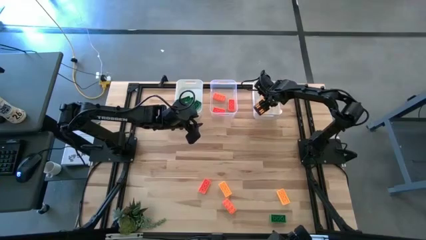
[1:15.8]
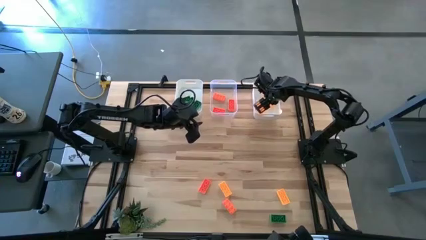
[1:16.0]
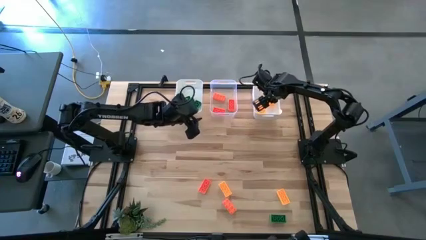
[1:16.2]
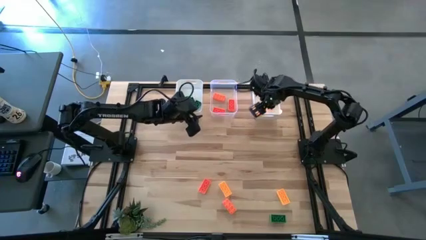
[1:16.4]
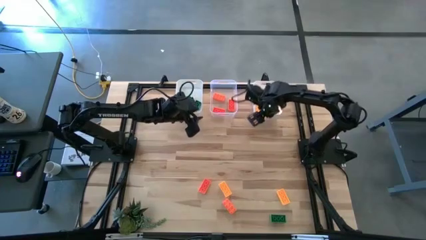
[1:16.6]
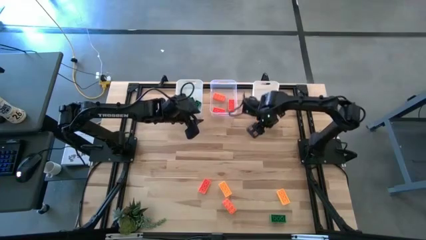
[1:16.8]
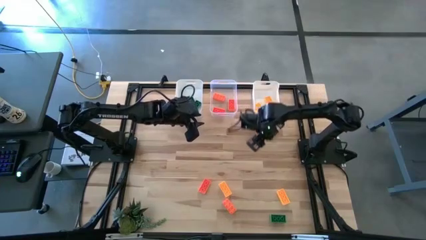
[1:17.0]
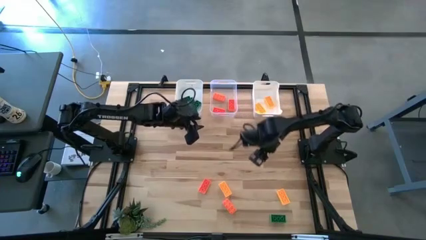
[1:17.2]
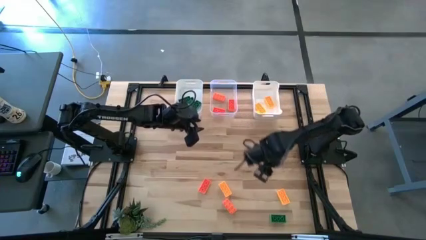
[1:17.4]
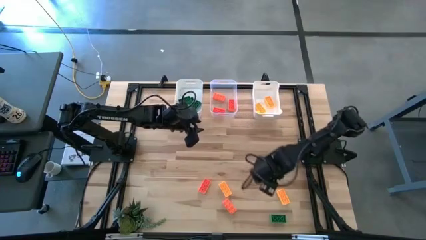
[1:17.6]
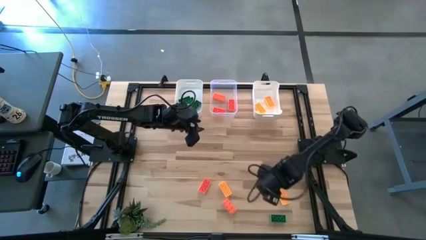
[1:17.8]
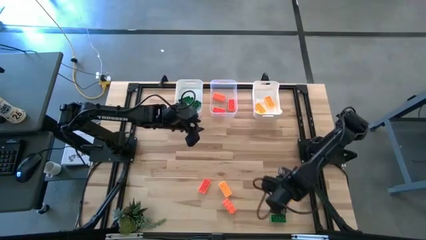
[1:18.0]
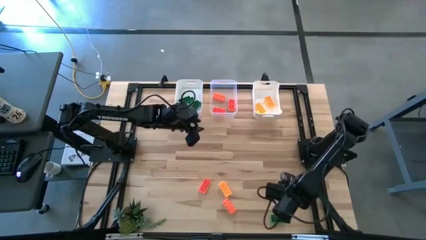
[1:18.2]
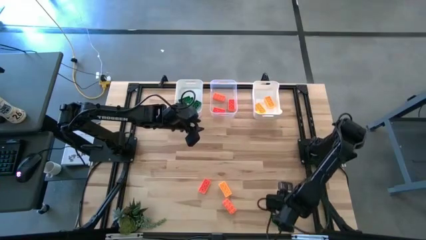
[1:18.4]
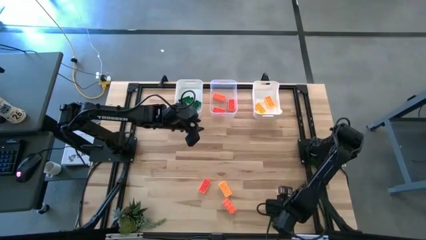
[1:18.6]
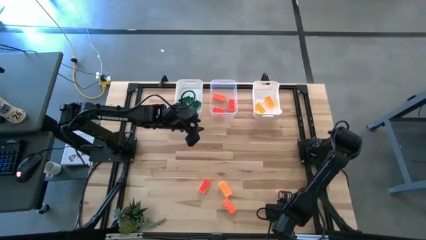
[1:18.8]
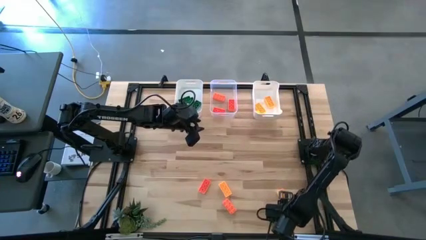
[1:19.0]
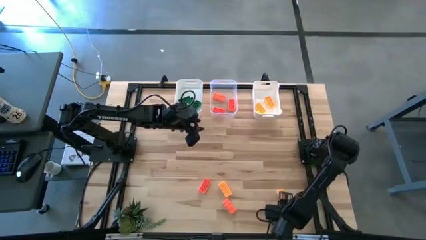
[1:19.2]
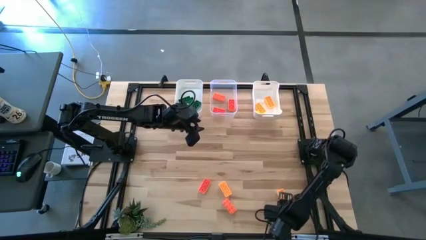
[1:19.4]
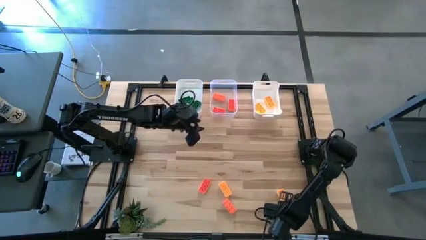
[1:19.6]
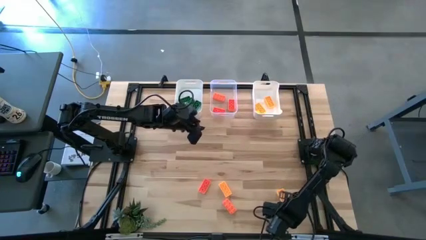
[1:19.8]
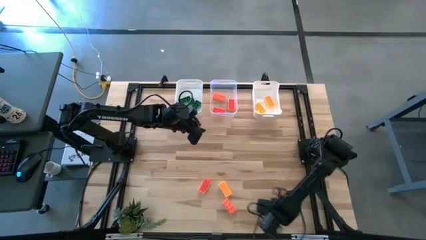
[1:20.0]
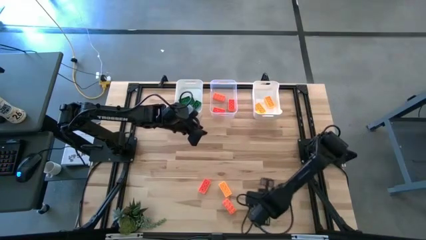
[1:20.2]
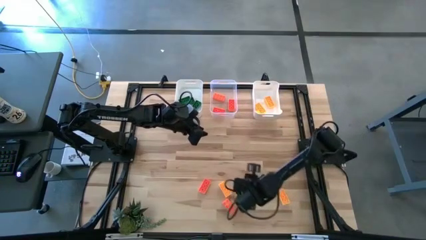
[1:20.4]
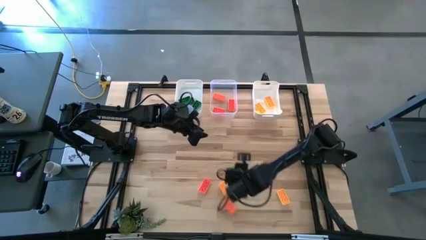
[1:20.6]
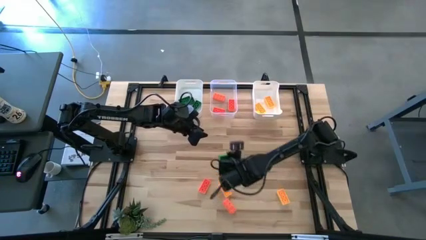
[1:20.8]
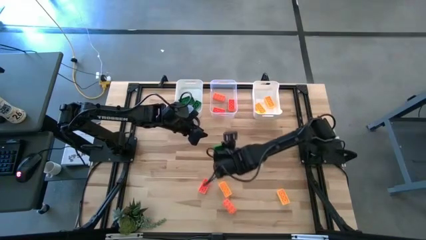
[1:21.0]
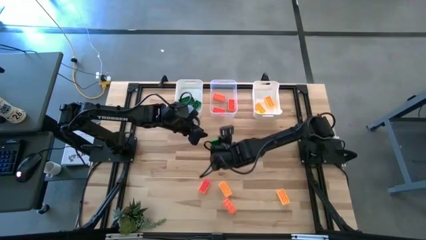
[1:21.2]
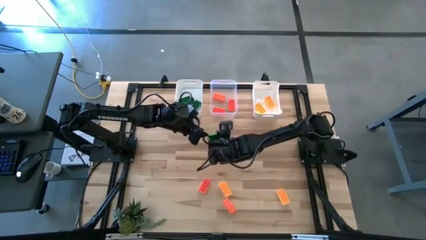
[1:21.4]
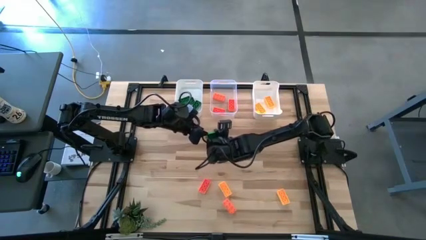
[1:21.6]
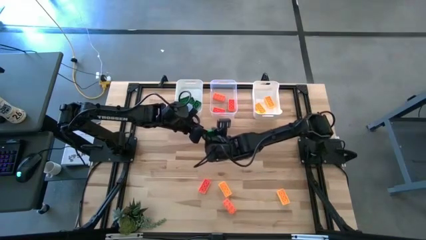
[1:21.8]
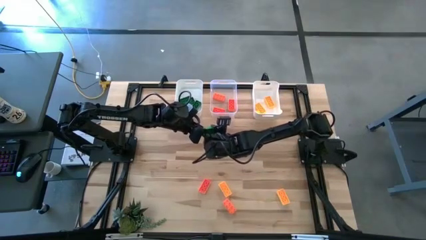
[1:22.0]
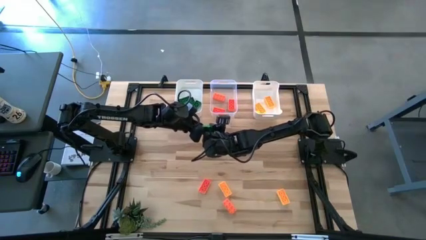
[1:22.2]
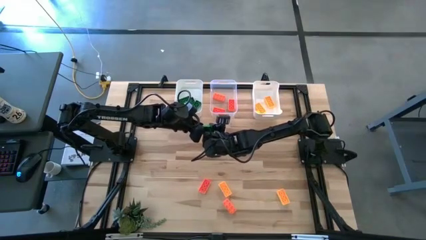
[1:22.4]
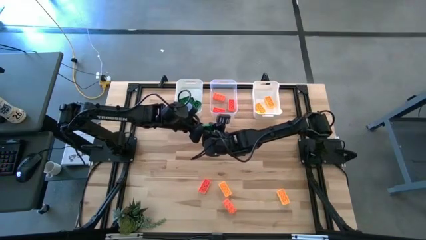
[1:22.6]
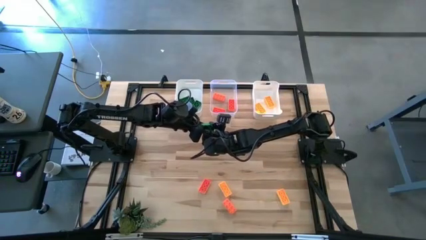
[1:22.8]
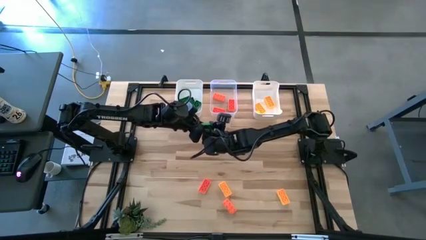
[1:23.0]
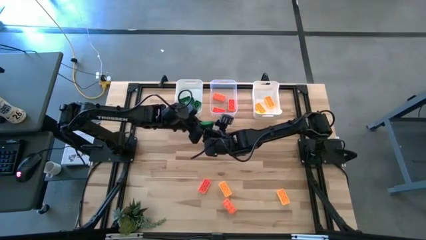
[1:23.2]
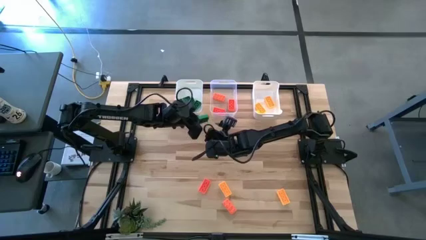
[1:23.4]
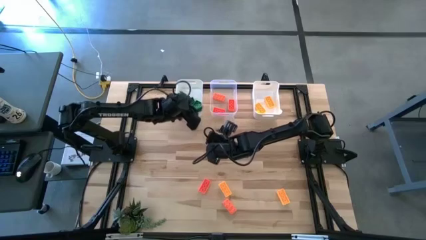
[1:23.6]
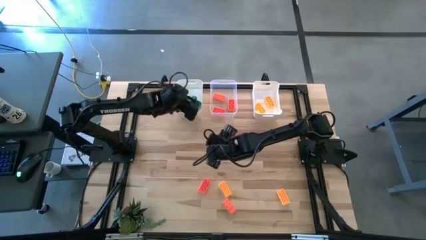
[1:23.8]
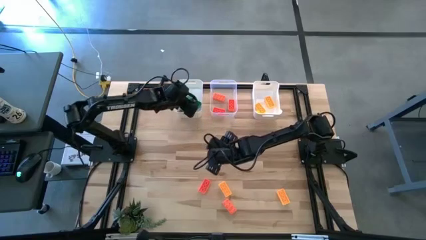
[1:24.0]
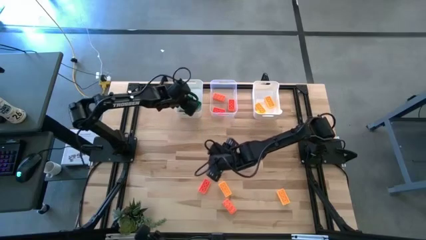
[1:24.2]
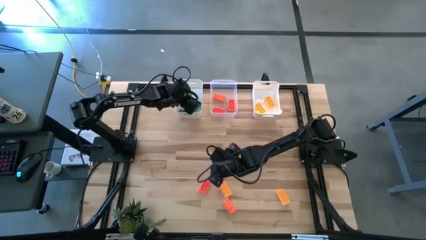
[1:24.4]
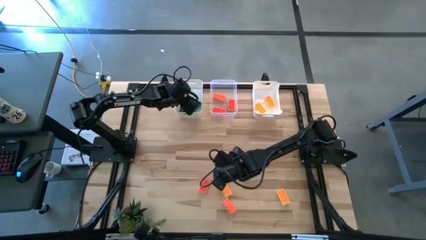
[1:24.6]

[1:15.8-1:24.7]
Task: Sort & place blocks by color
Put the green game piece into the left white bin

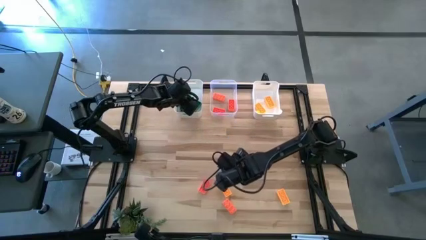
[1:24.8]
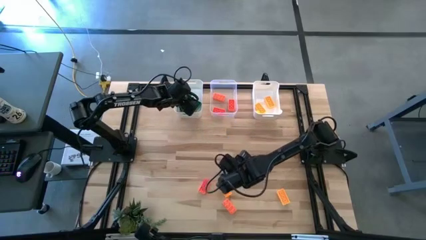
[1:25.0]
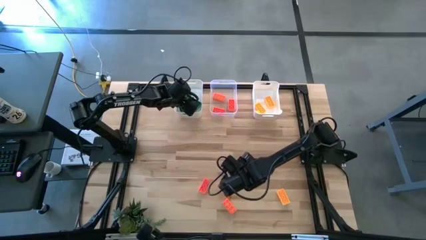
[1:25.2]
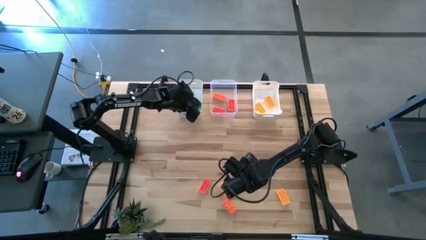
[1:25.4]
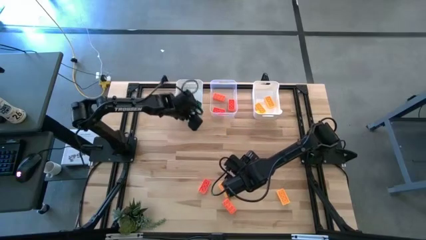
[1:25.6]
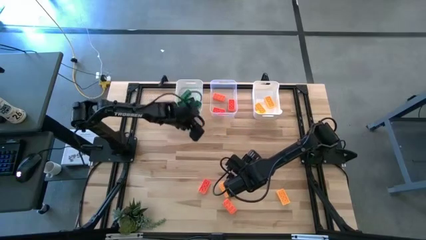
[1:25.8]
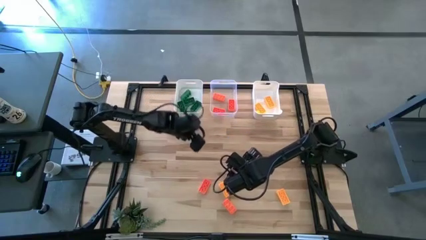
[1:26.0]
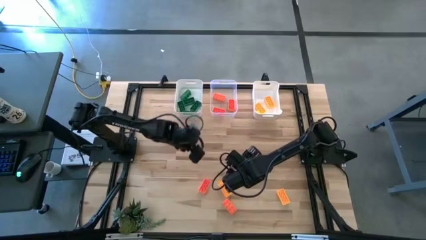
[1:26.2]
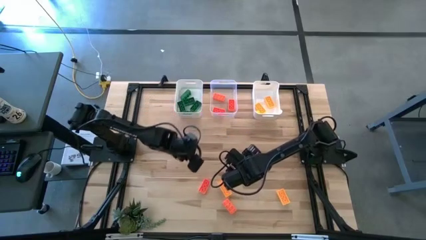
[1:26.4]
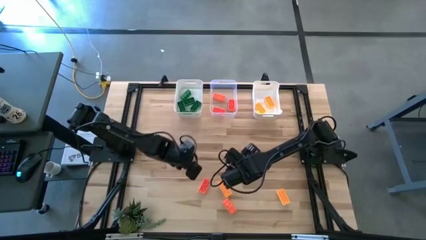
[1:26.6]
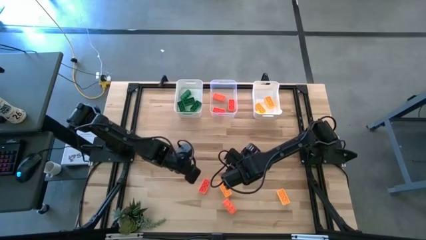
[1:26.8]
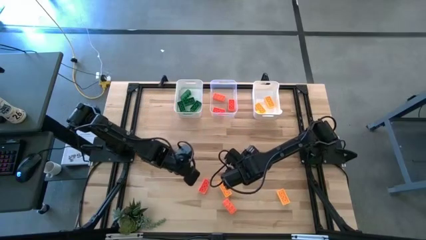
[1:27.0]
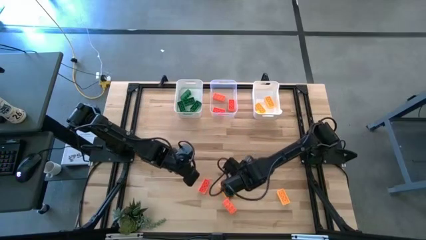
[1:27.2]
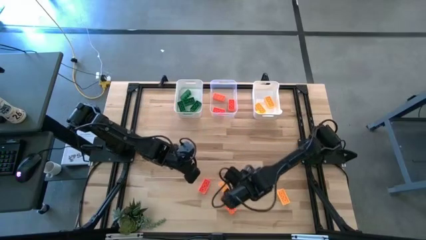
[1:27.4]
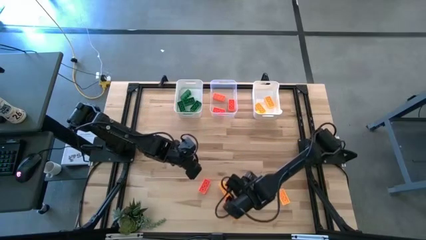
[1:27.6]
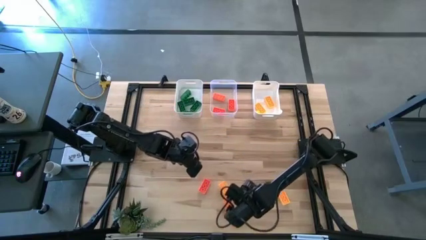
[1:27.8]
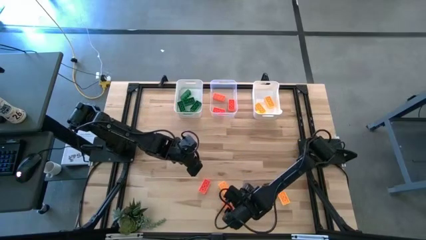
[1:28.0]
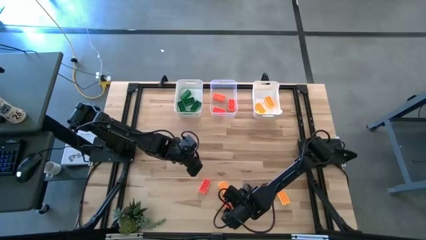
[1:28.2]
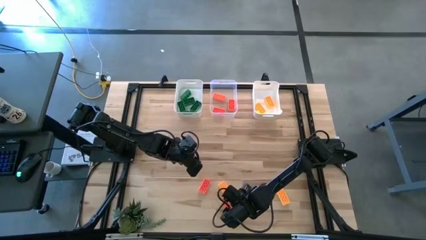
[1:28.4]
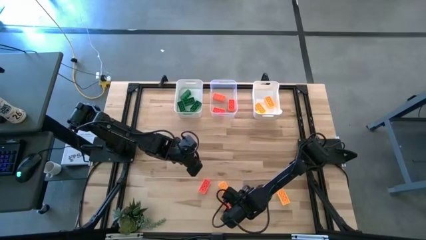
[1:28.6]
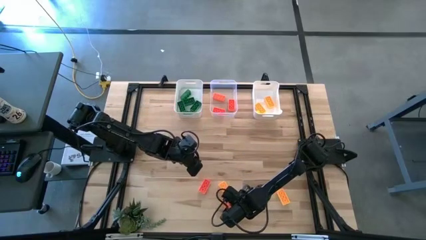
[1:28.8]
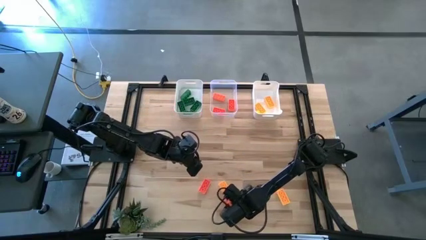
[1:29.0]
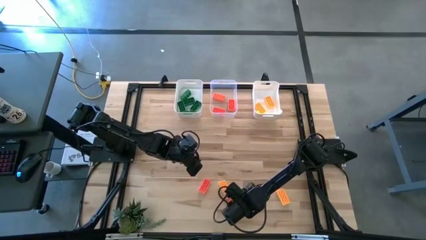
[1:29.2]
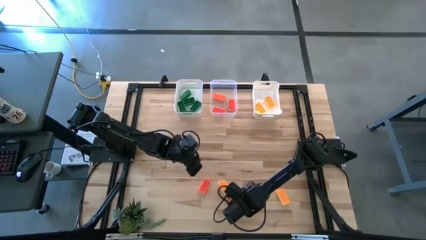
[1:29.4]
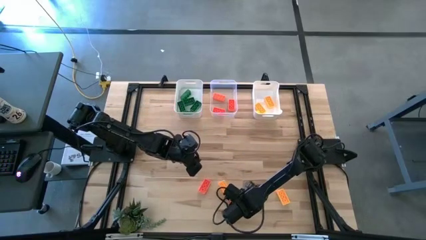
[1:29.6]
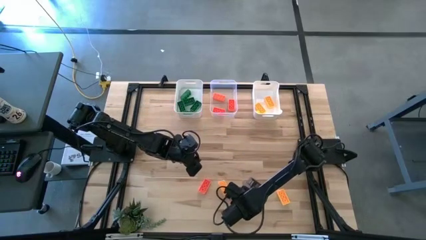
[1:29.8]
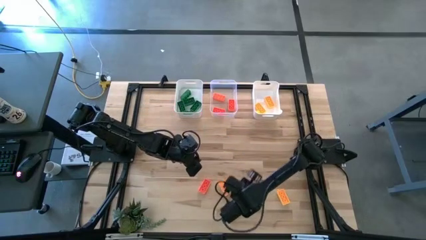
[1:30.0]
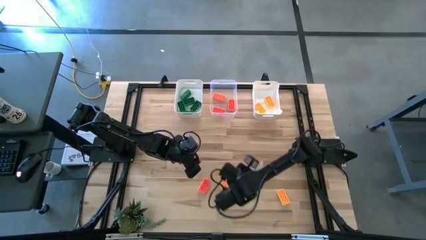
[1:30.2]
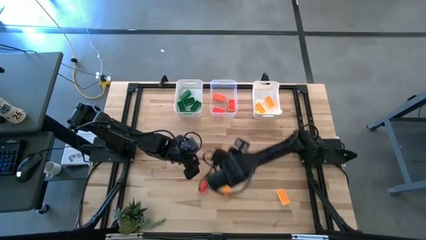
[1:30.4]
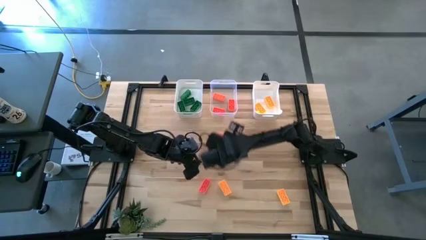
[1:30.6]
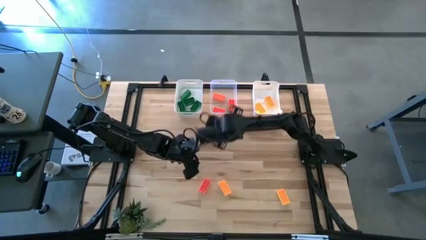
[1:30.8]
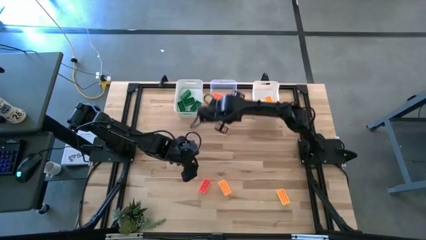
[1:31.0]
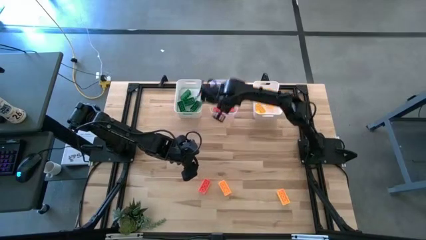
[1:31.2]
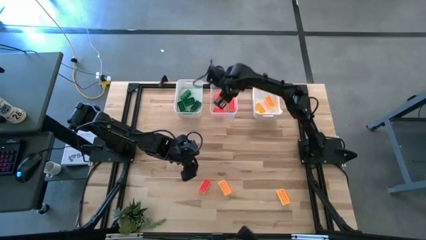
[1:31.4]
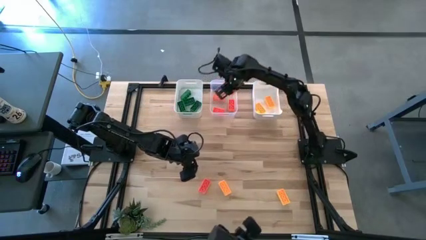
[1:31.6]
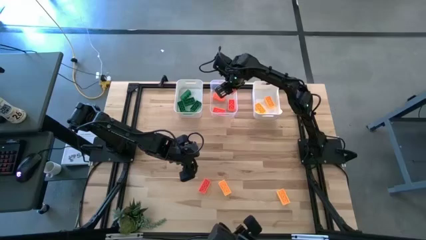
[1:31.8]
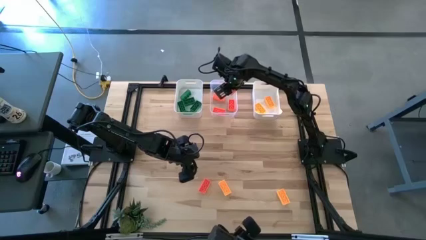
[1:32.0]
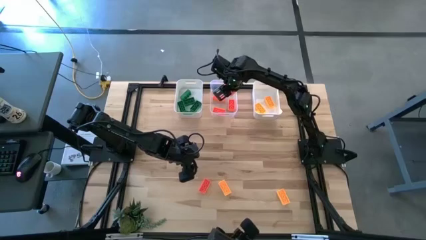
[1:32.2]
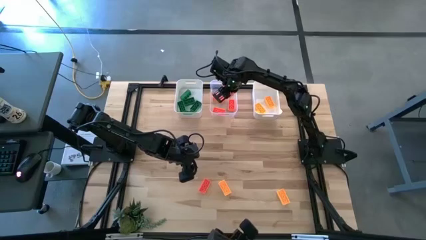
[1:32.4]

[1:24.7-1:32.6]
Put the orange game piece into the transparent bin
